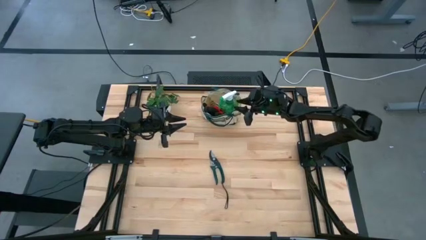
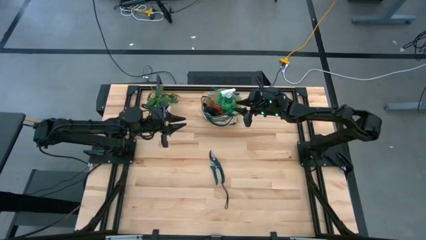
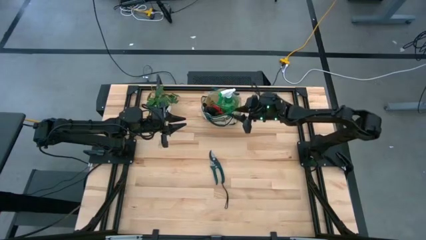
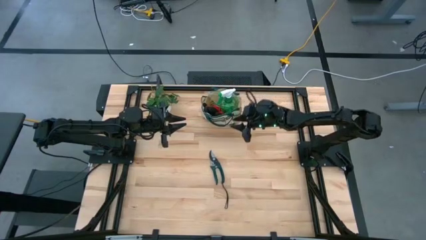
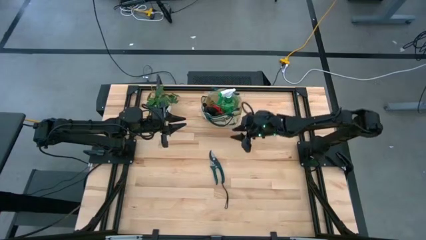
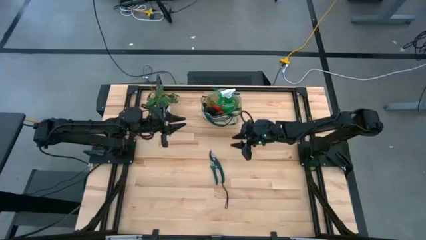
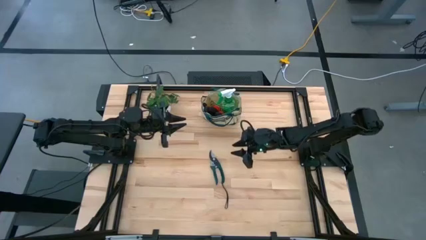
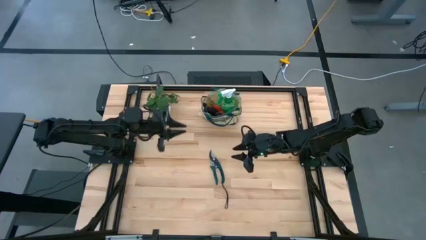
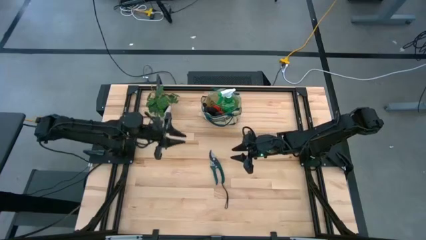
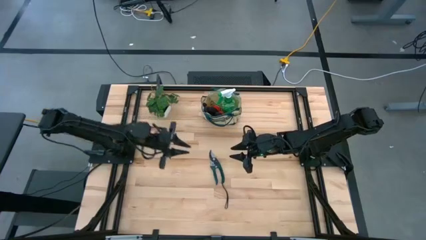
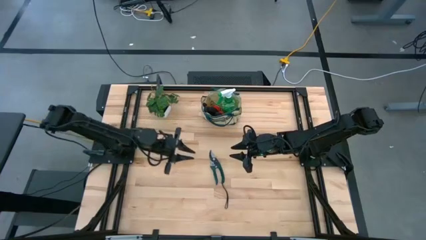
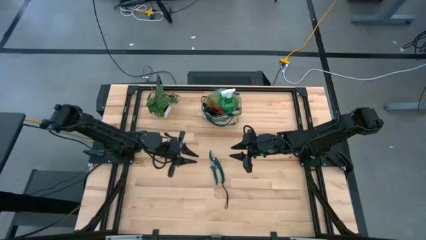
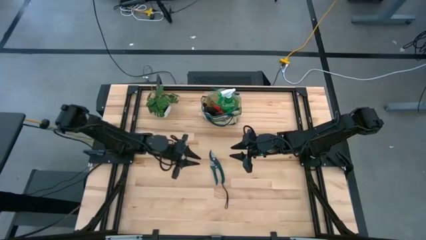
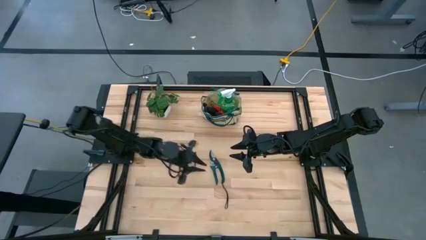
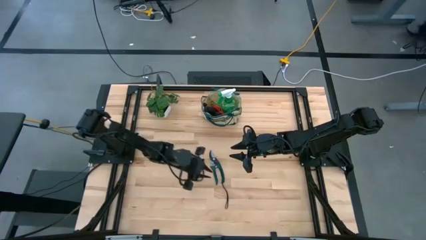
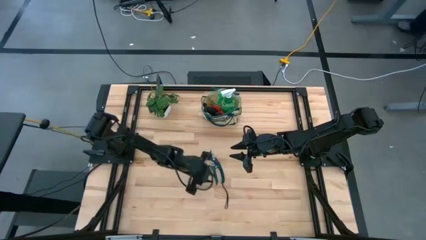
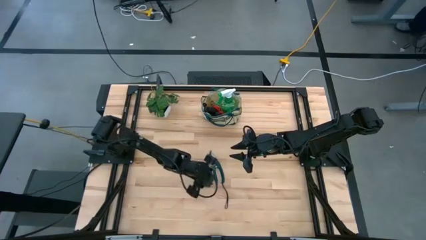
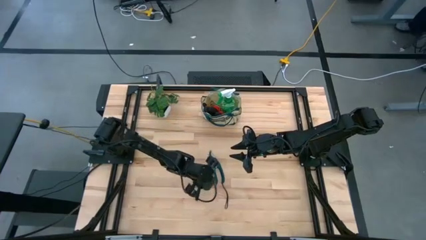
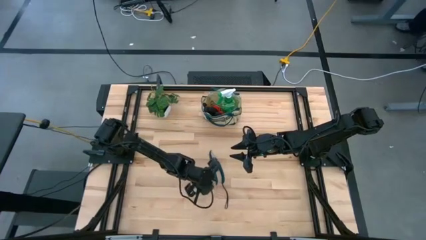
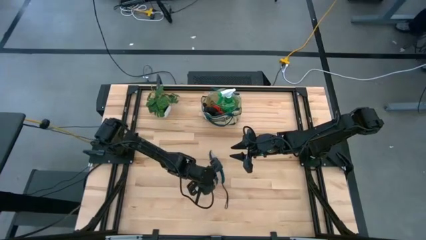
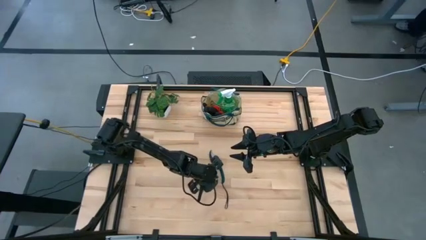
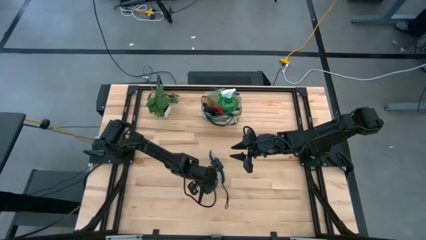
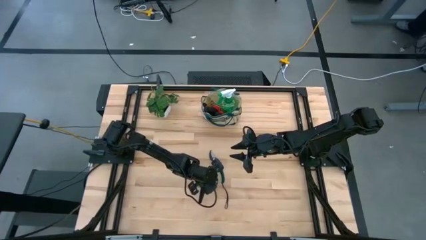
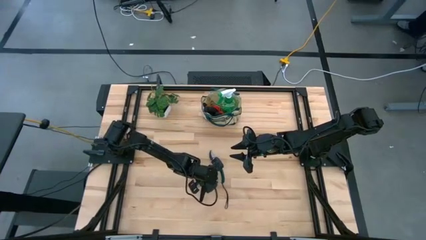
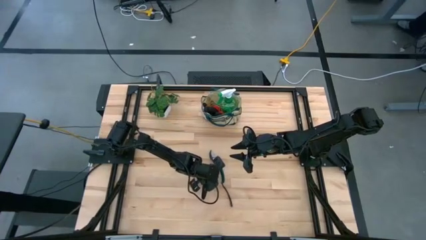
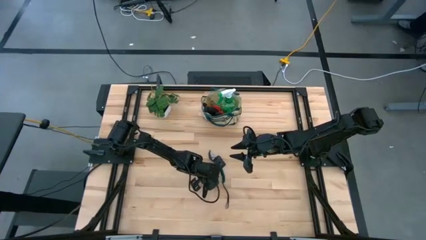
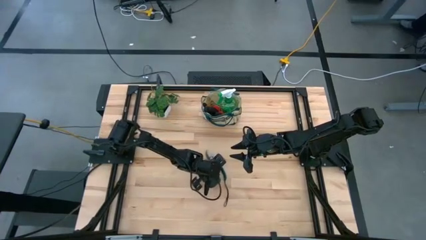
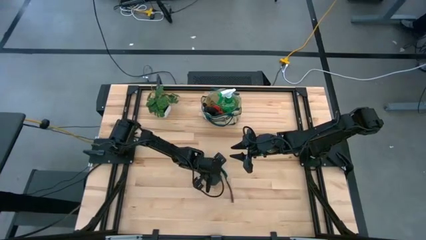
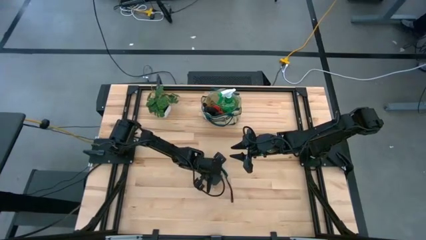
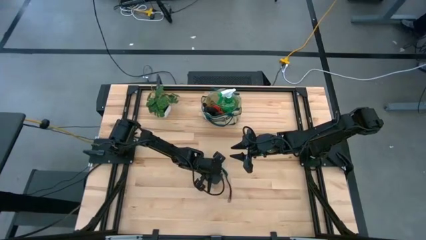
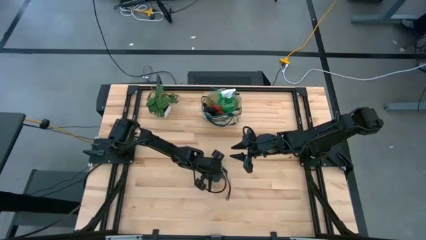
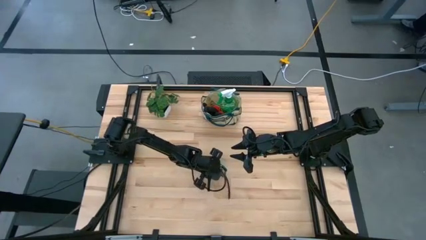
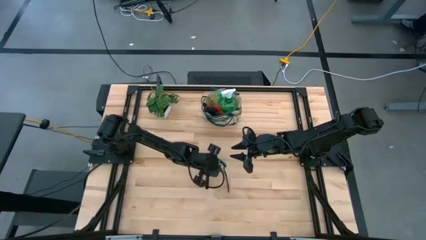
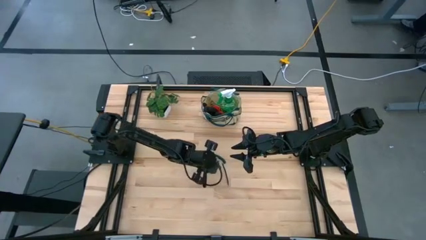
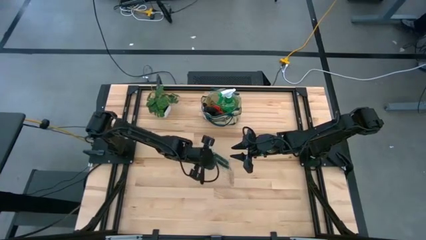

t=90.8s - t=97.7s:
Task: Pick & Place Garden tools in Gardening bag
Put the green shear scissors into the gardening bag

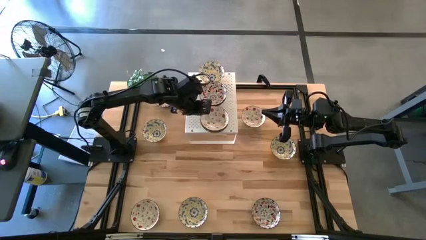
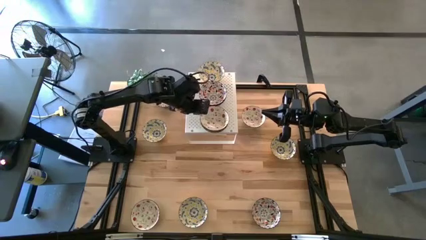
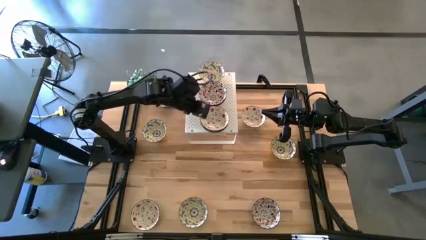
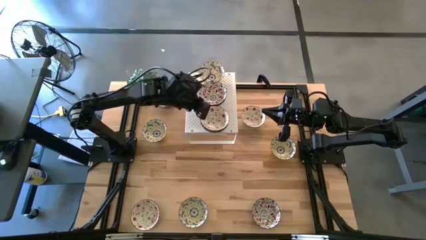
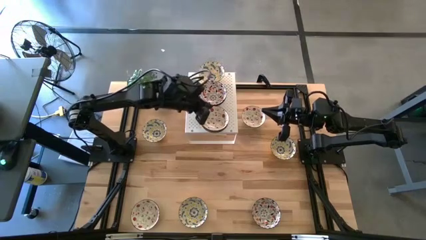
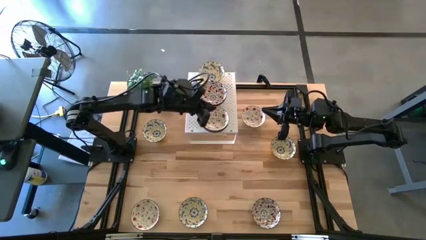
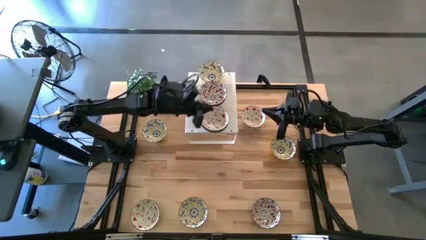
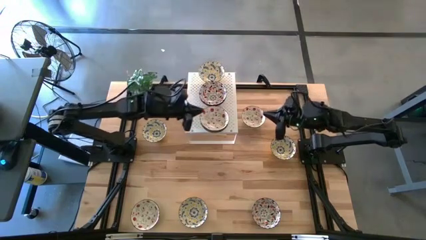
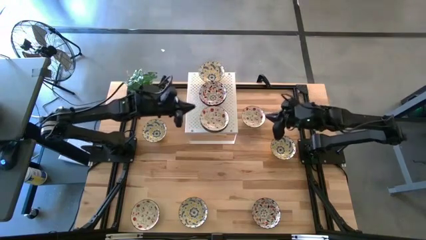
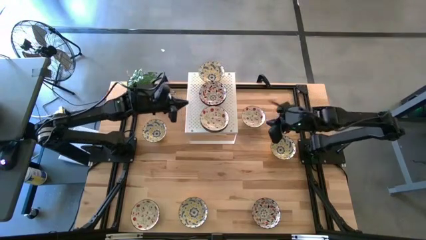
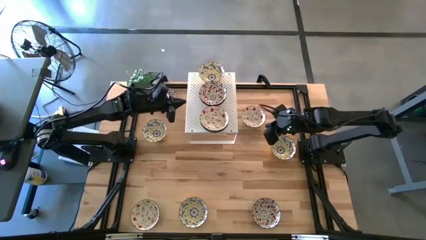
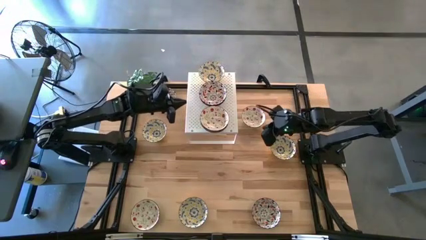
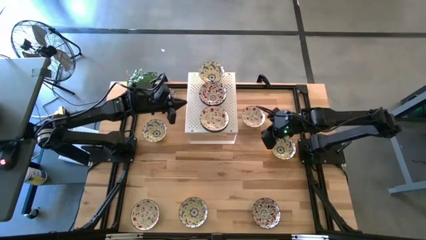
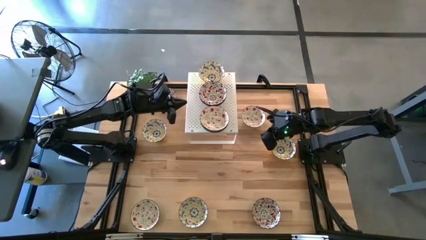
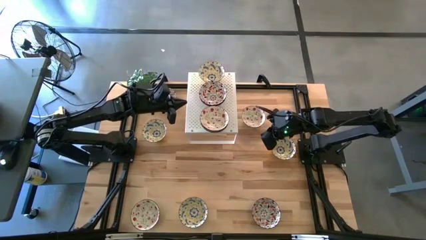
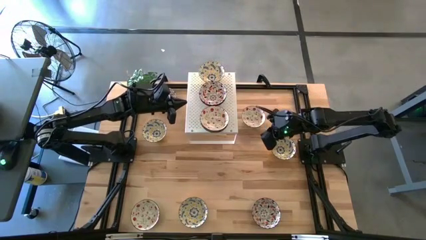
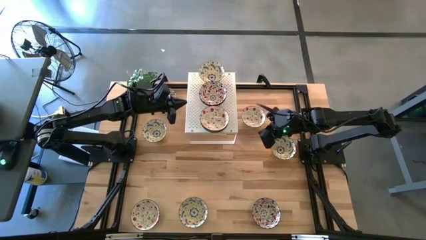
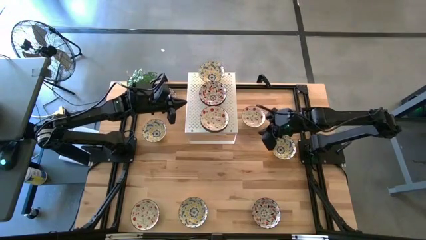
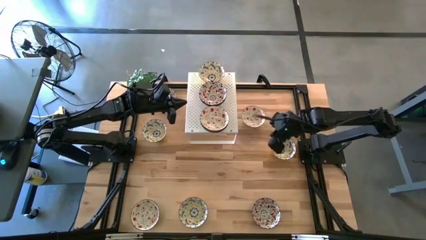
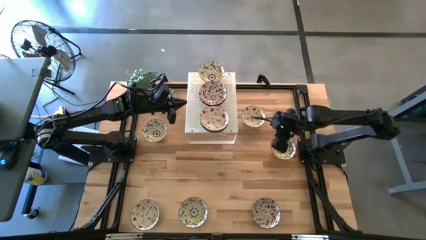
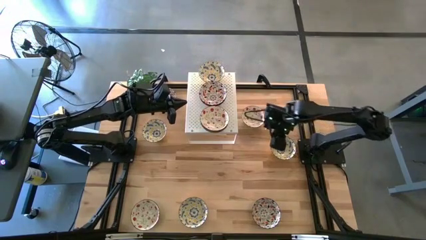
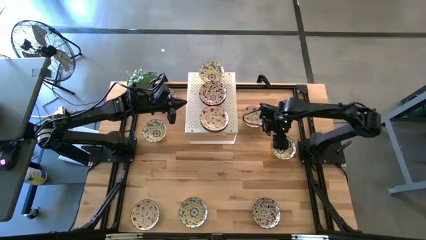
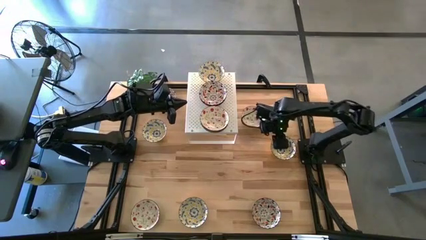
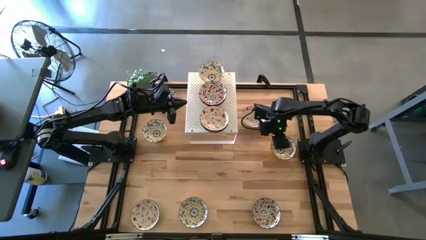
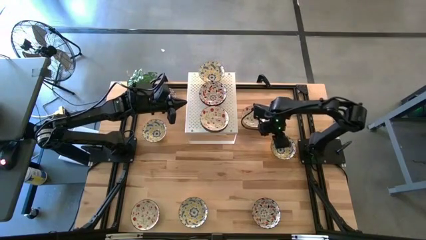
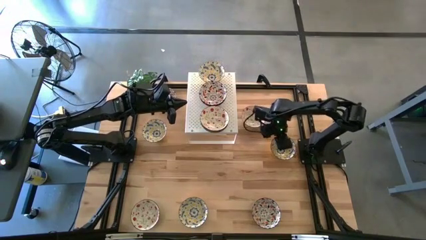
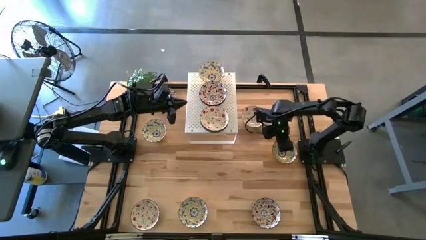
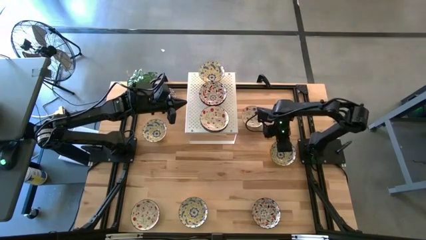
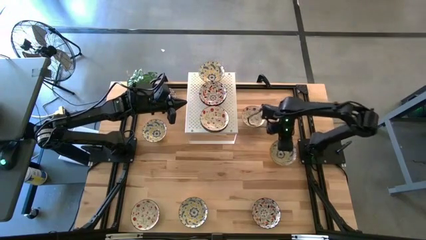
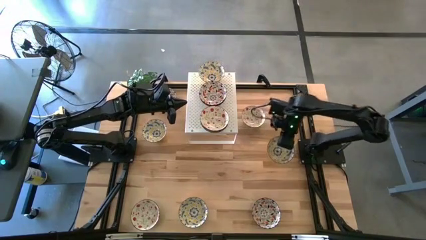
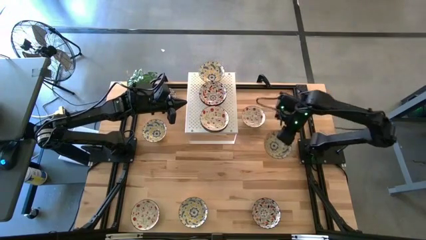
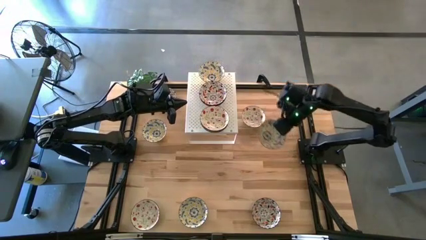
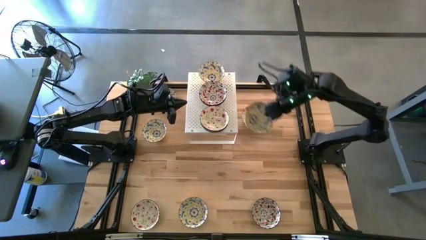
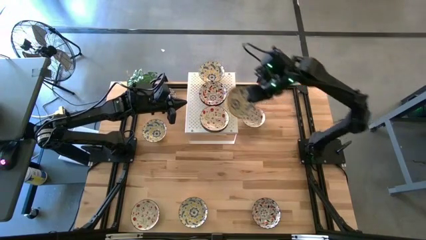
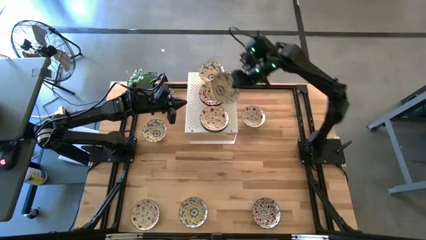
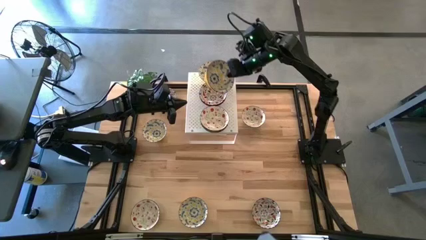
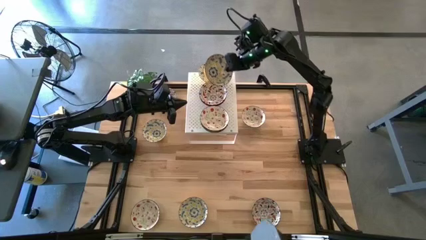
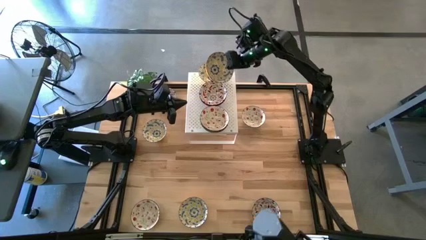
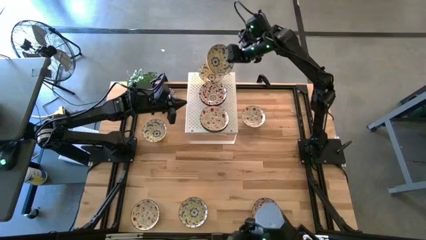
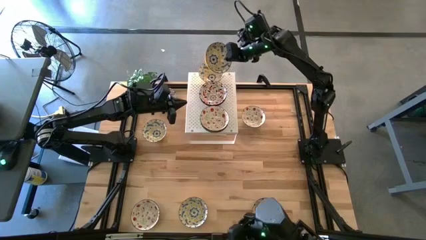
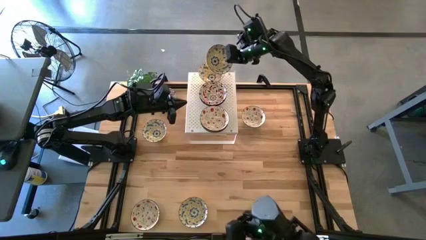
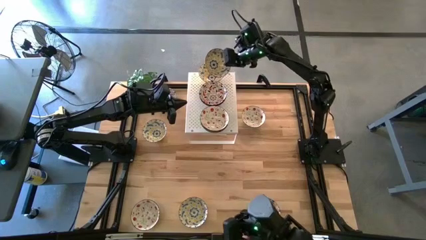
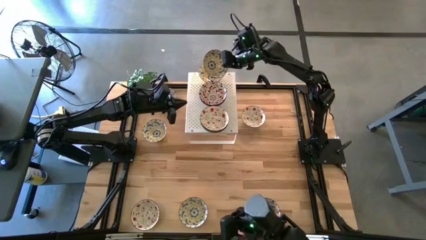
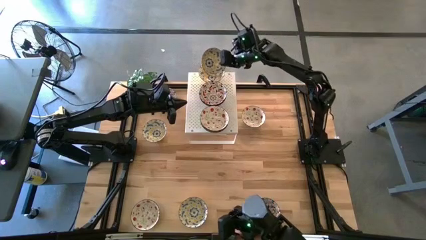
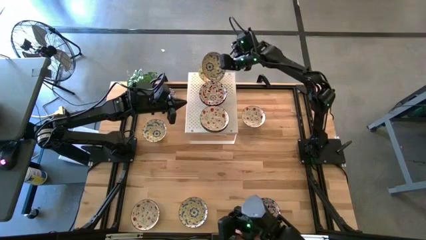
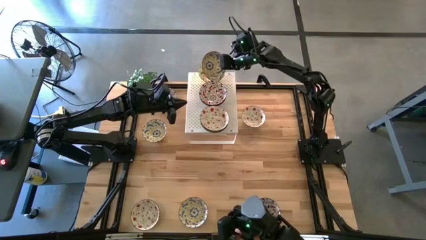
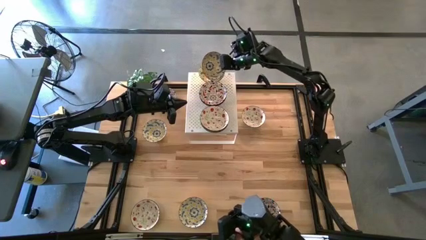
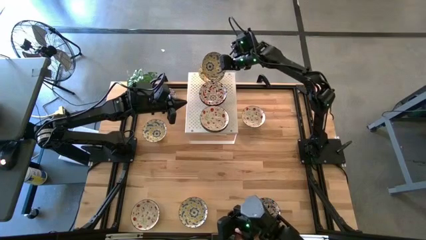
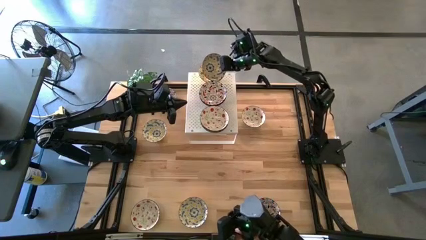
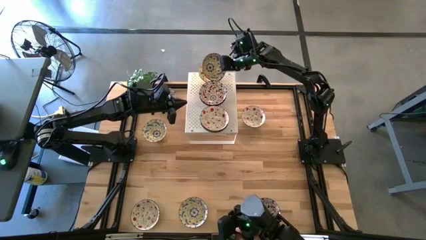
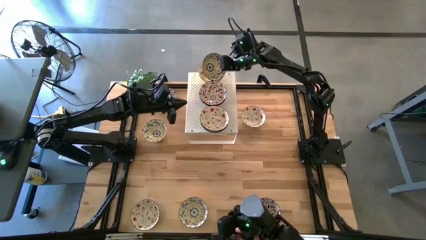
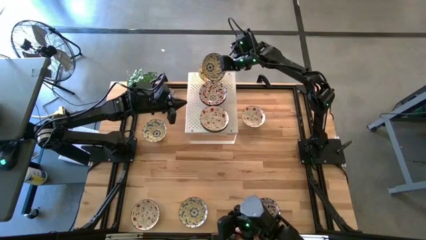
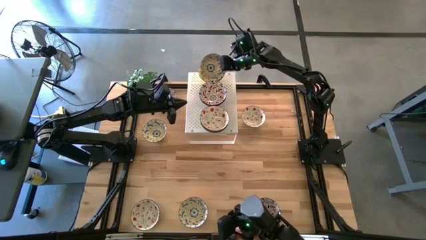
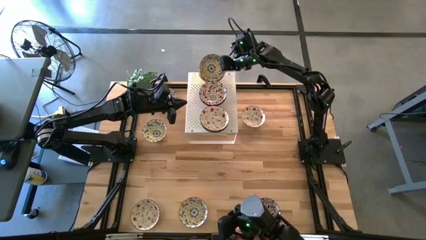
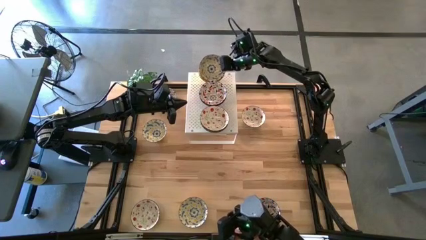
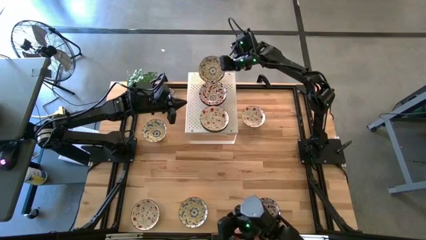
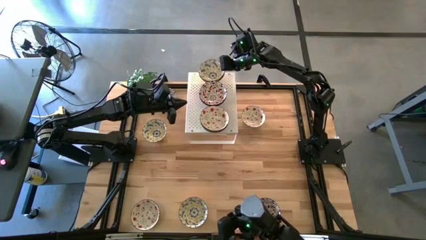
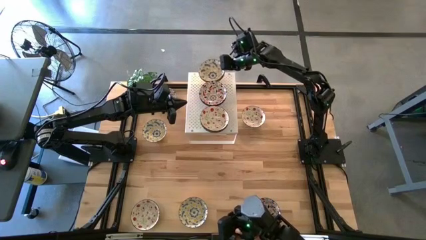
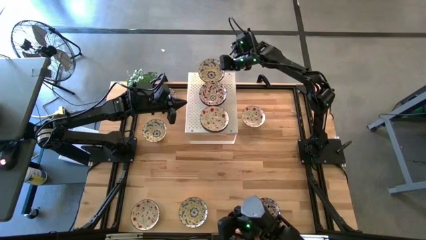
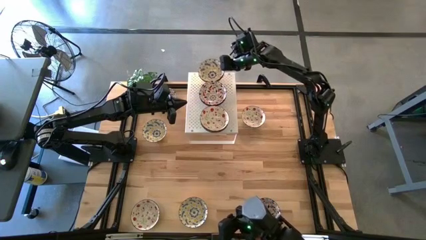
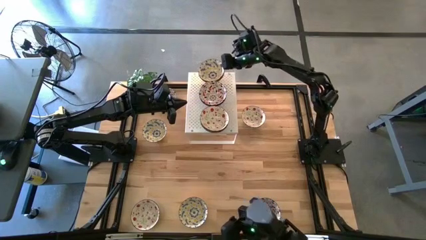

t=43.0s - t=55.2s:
Task: Pick & Place Mini bowls
Stack the yellow patterned bowl on top of the yellow patterned bowl on the shelf
